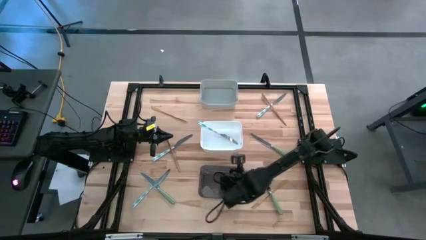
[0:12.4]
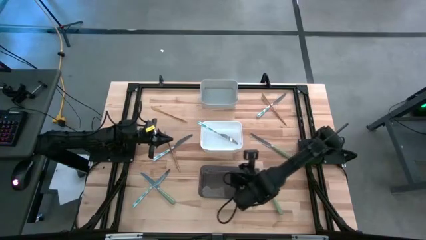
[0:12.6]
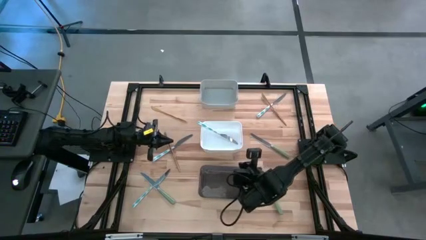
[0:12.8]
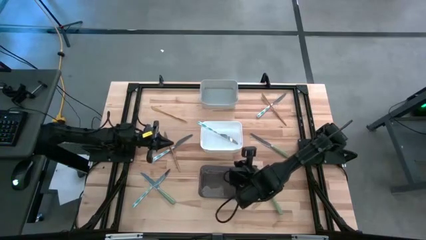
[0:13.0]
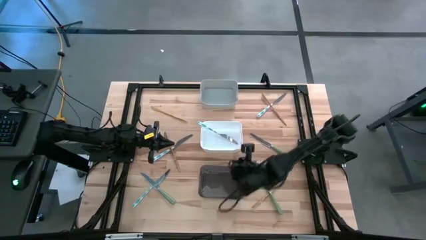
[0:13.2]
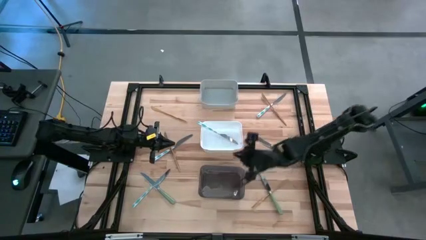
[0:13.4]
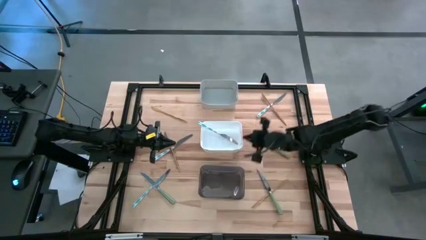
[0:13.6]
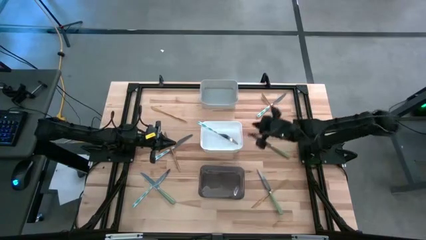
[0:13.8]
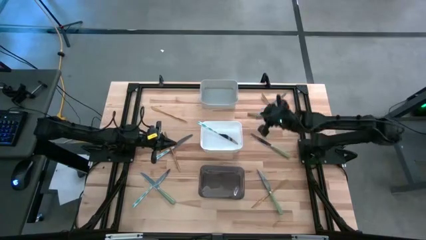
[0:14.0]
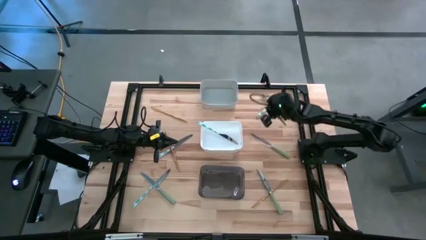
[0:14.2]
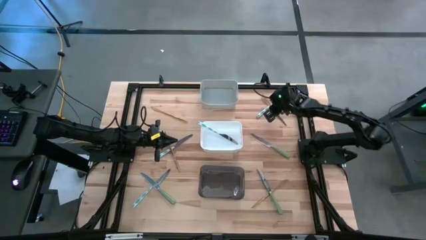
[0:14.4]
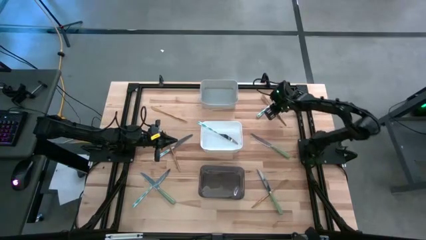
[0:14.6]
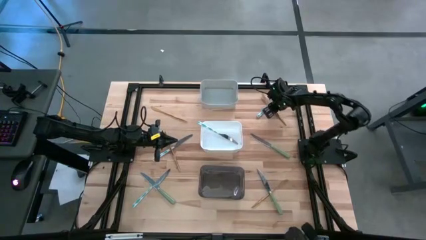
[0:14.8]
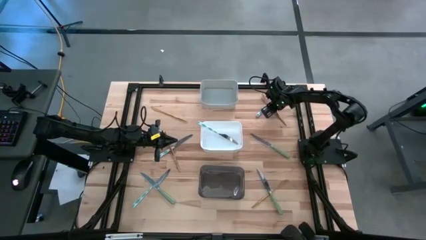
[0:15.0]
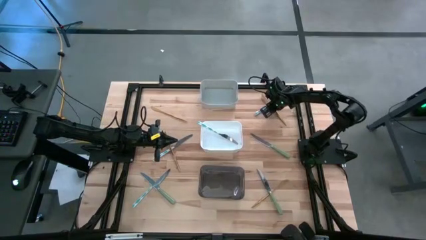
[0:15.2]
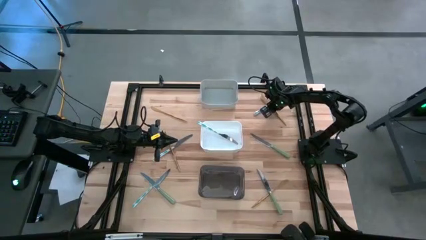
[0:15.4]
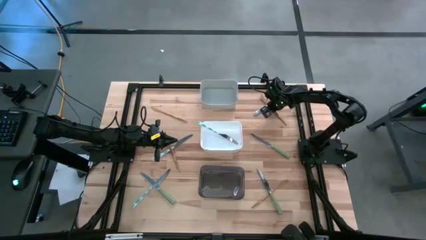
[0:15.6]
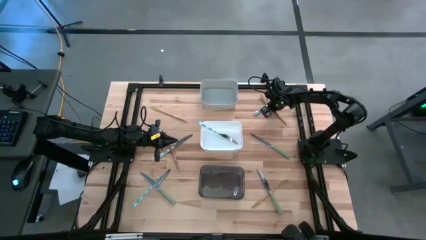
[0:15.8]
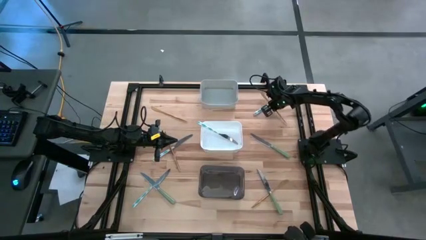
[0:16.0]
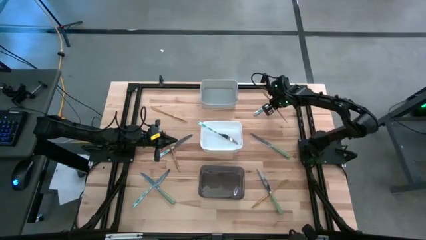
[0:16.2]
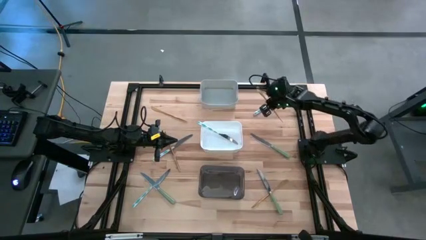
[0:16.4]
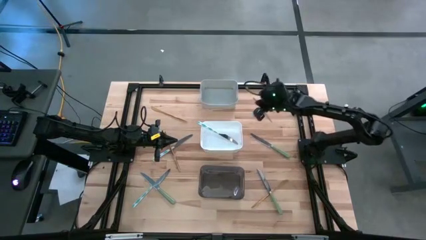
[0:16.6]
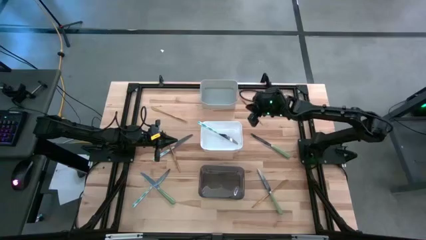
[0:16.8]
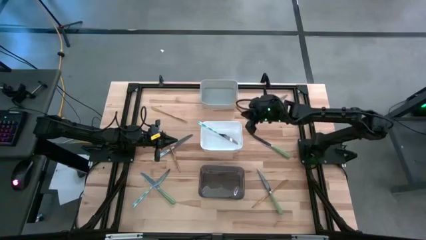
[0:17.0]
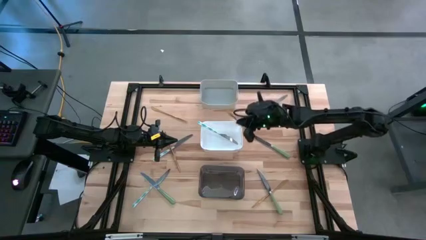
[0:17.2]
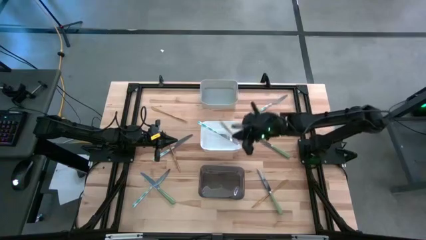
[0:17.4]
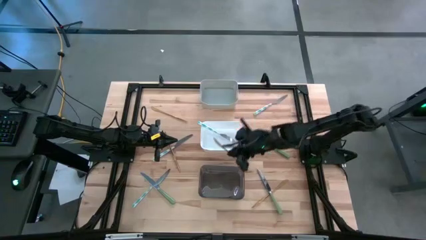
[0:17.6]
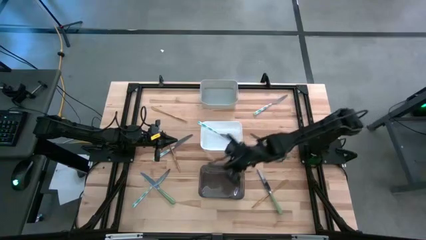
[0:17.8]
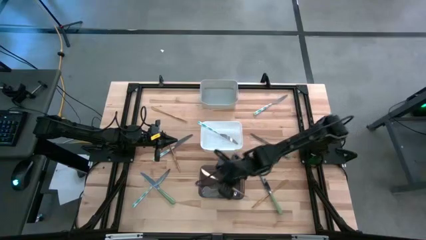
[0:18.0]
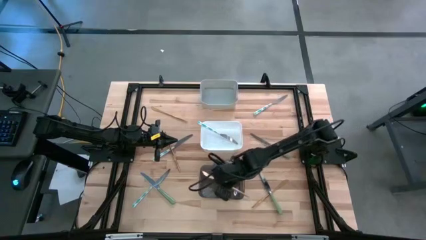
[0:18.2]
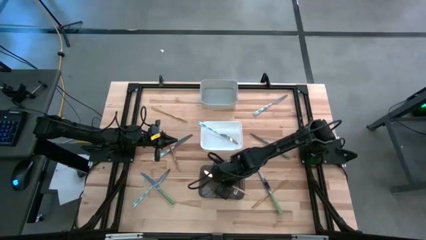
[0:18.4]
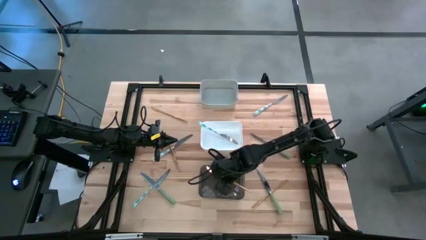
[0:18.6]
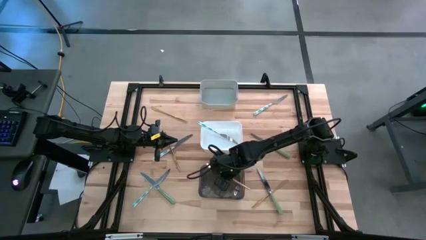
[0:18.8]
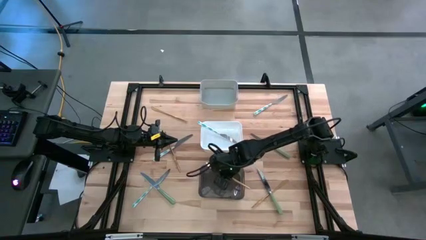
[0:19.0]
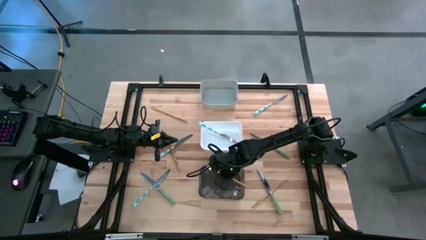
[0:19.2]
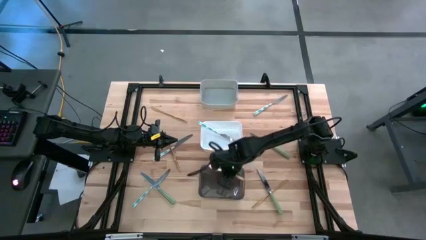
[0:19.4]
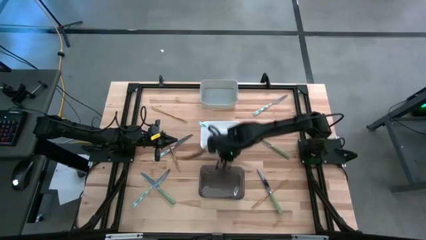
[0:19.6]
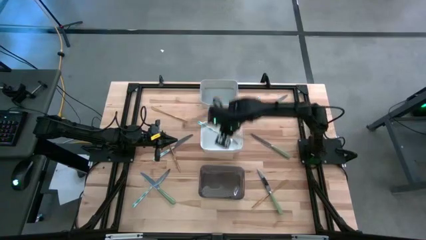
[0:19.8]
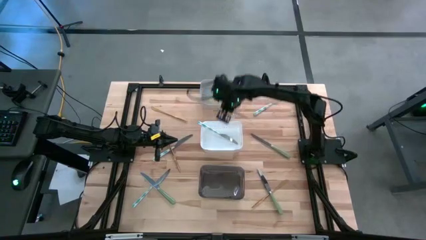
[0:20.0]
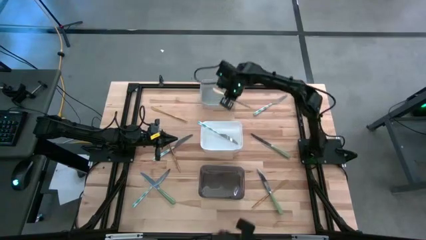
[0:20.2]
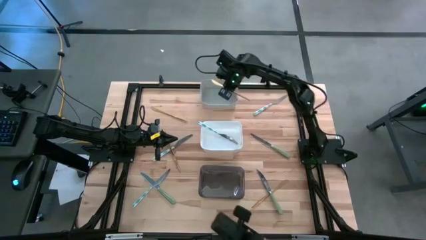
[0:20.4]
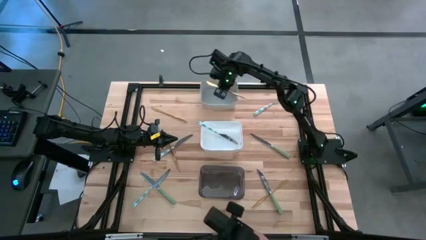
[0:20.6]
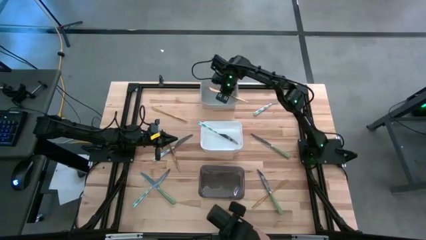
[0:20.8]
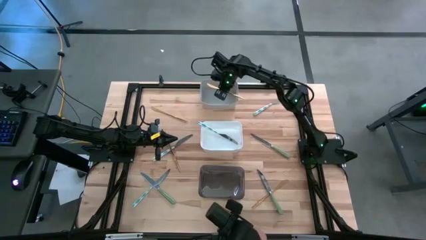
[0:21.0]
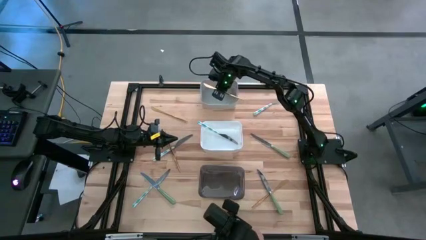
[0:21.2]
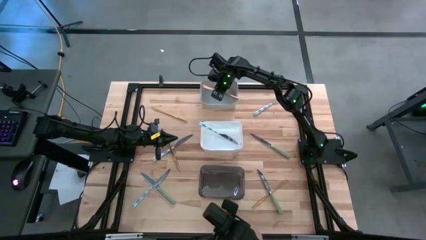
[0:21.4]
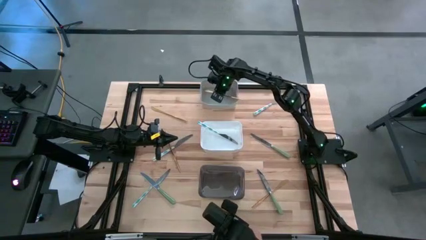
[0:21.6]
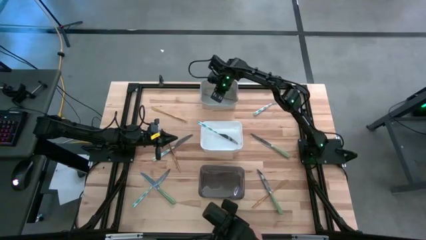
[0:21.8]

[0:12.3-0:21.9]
Task: Sort silverware by color (type)
Put the gold table knife into the gray bin

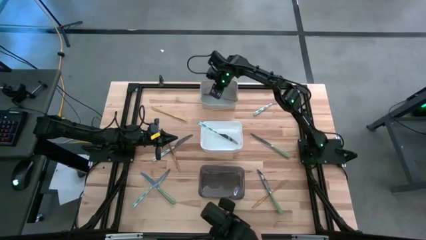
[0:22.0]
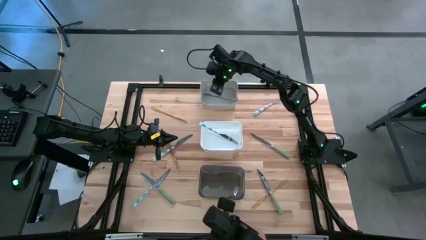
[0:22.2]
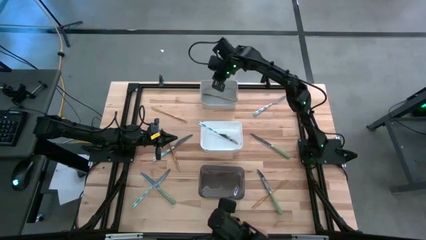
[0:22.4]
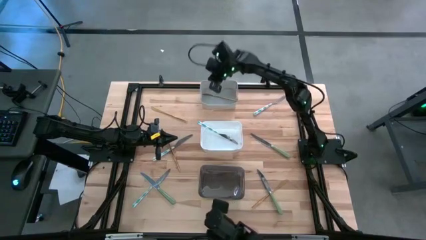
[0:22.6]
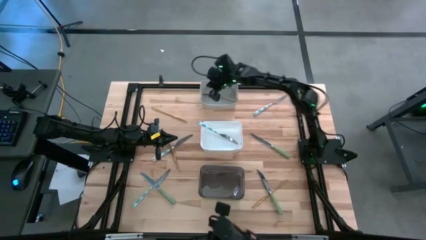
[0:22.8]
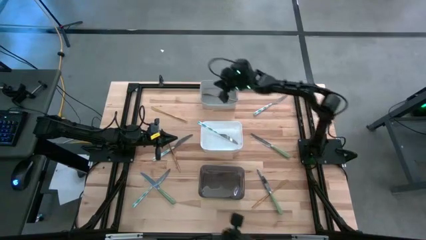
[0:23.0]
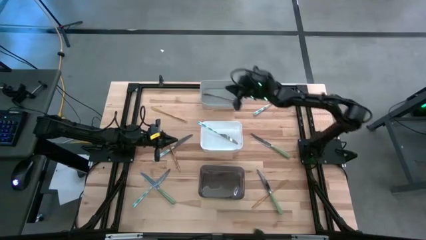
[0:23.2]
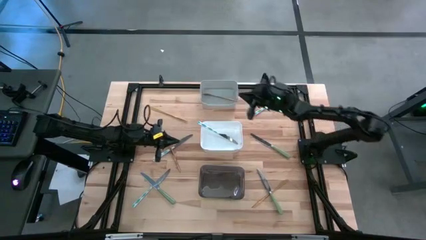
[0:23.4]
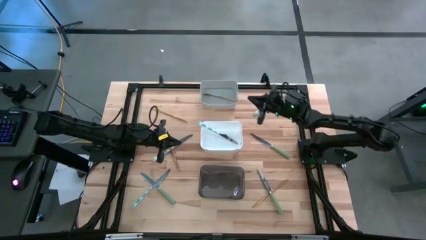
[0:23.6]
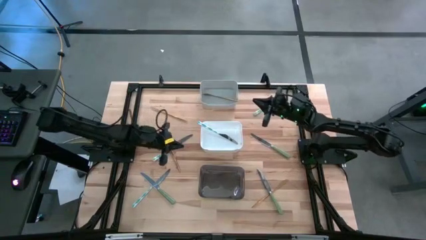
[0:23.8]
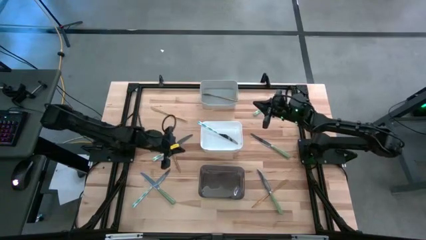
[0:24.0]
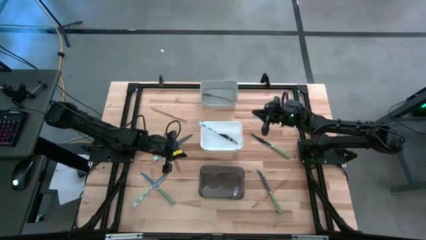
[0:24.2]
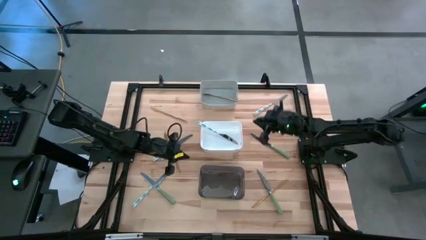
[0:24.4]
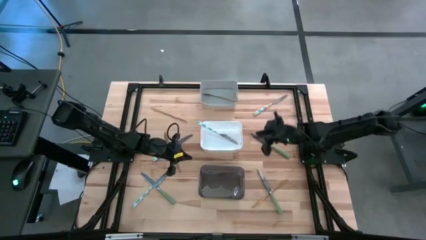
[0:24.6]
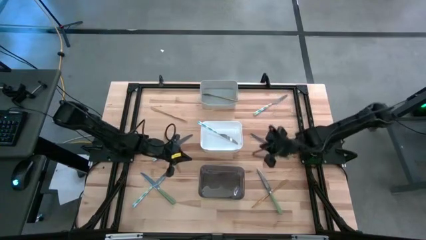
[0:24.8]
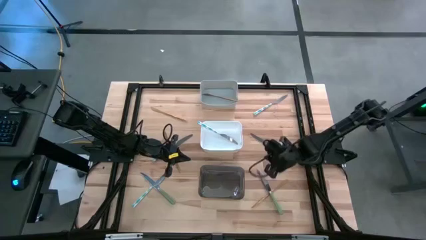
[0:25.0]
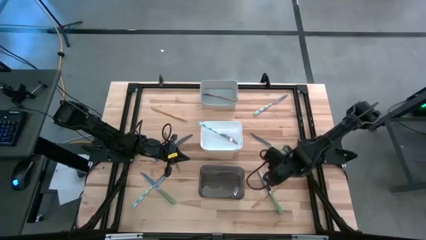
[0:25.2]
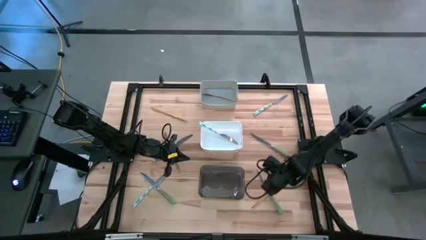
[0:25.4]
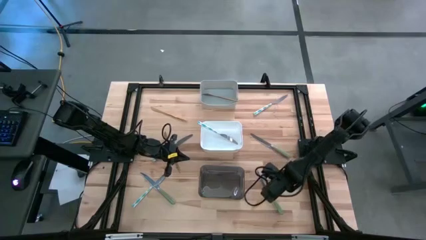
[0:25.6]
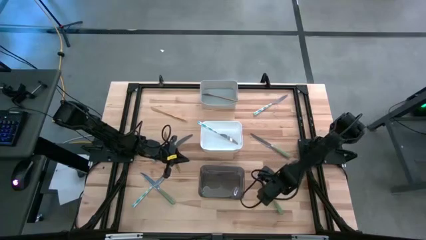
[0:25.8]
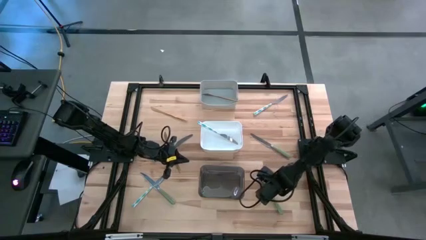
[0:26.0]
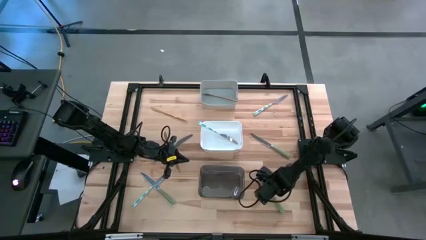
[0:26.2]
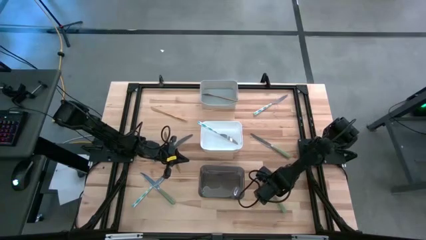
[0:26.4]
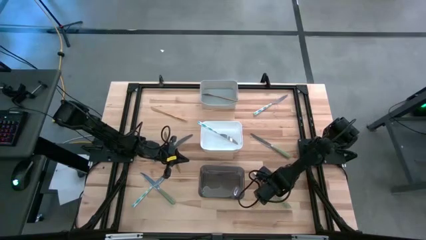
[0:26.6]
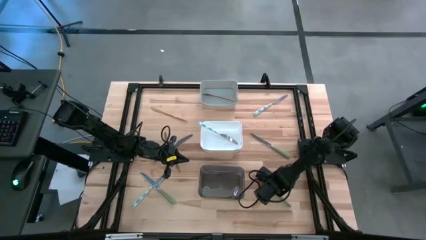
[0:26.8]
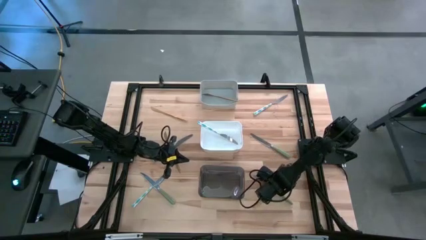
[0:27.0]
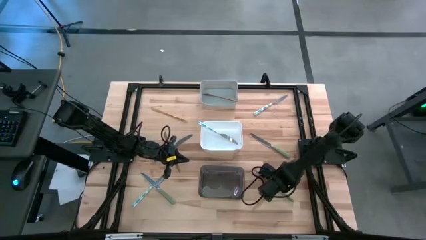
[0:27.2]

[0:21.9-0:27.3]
Put the light green table knife into the black bin
